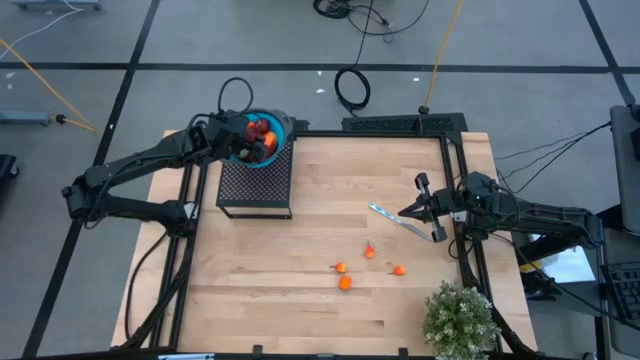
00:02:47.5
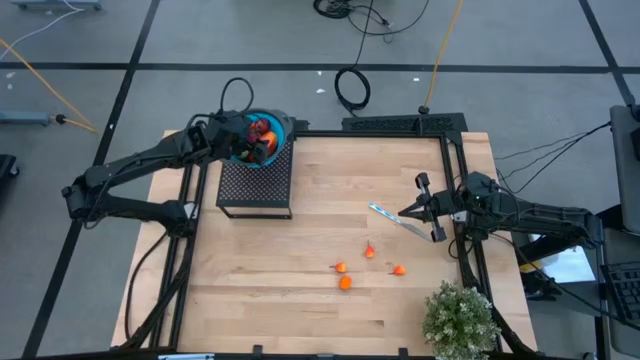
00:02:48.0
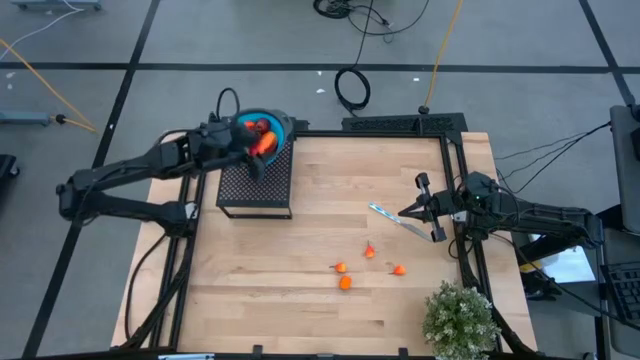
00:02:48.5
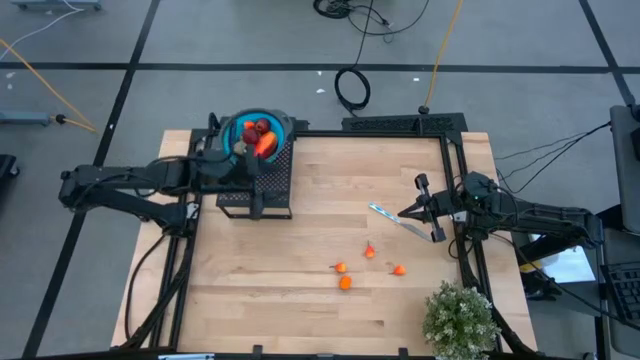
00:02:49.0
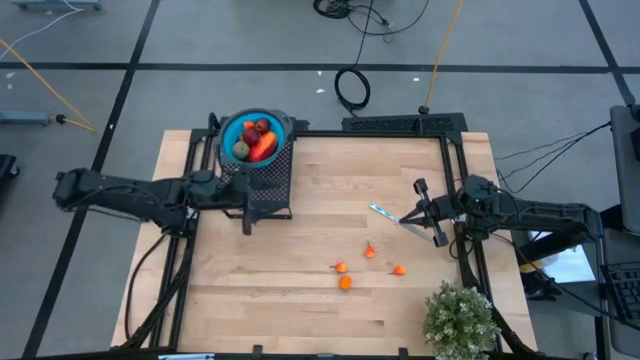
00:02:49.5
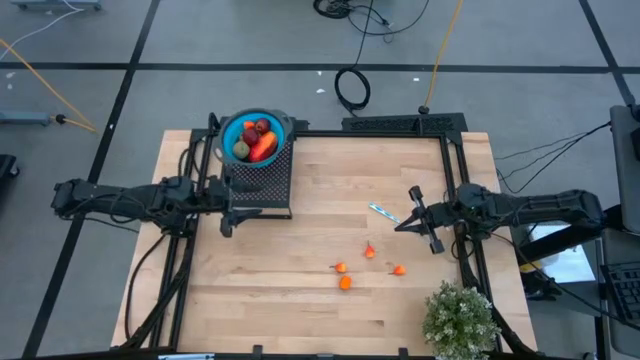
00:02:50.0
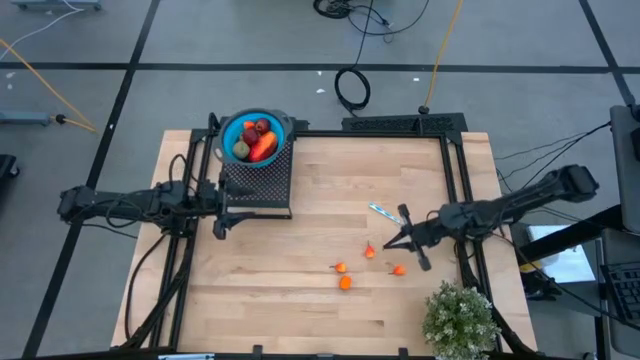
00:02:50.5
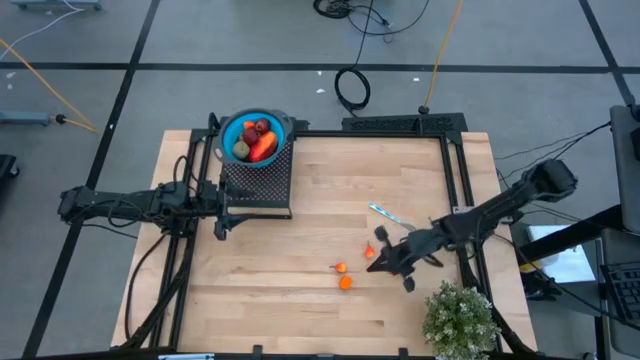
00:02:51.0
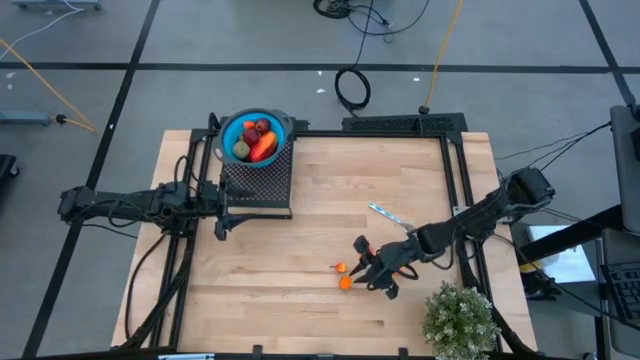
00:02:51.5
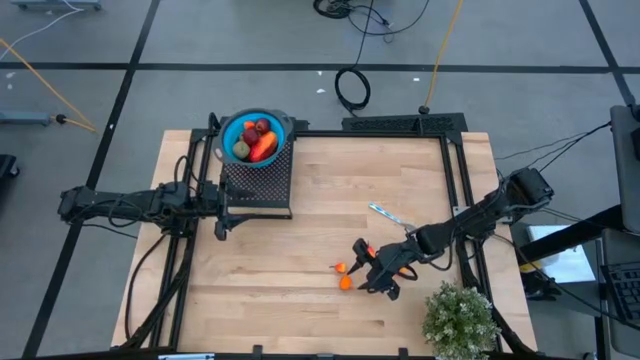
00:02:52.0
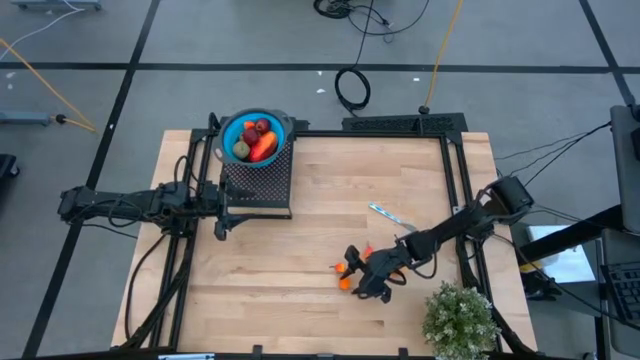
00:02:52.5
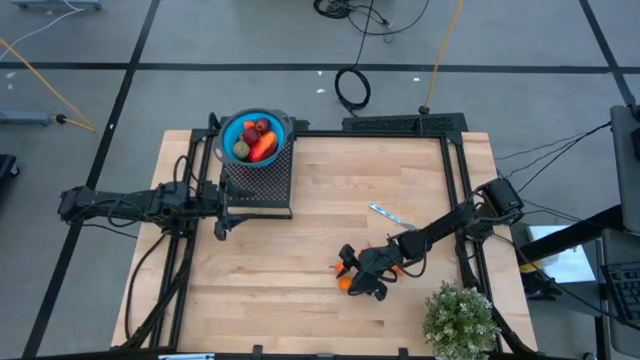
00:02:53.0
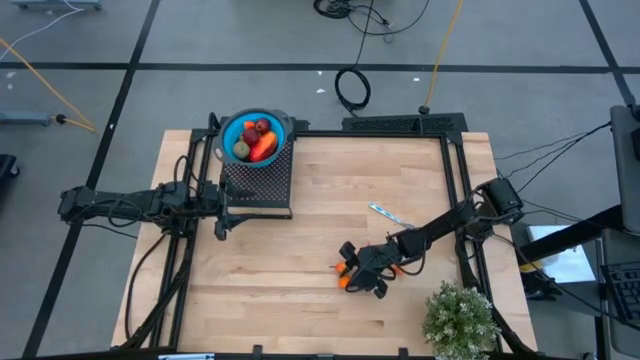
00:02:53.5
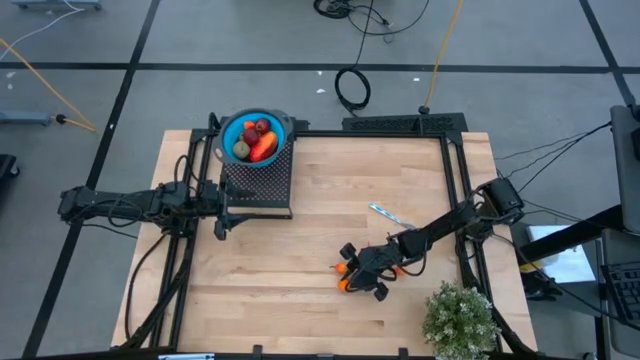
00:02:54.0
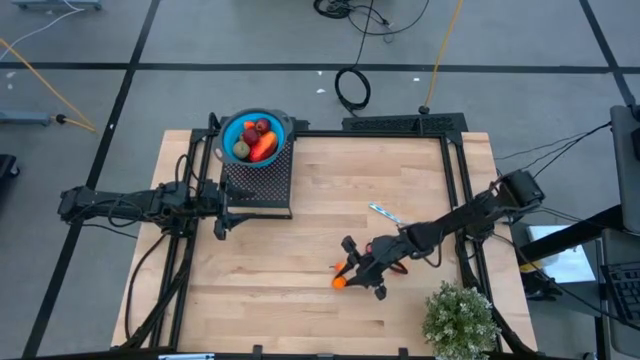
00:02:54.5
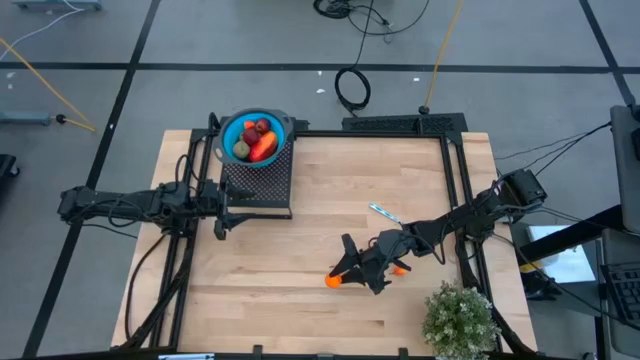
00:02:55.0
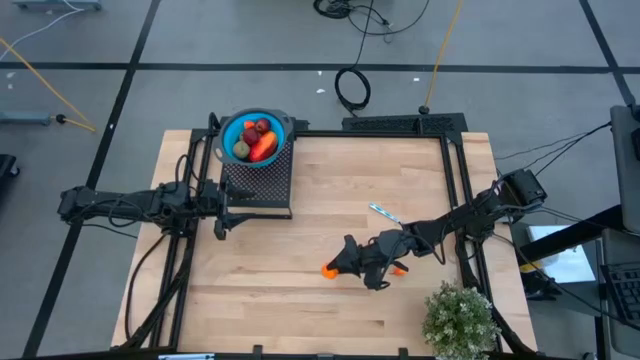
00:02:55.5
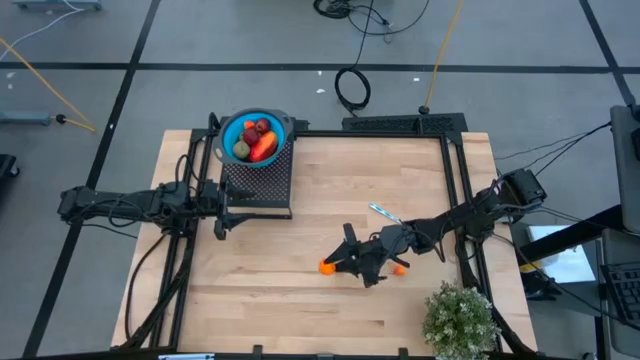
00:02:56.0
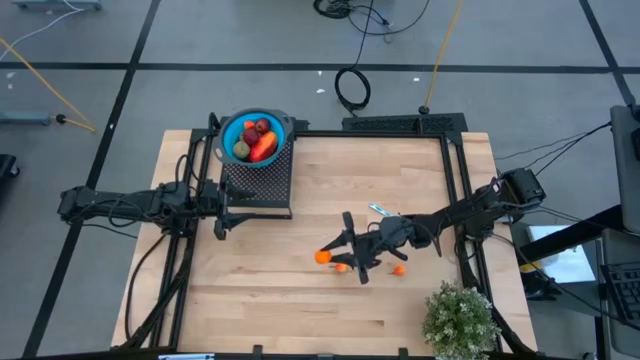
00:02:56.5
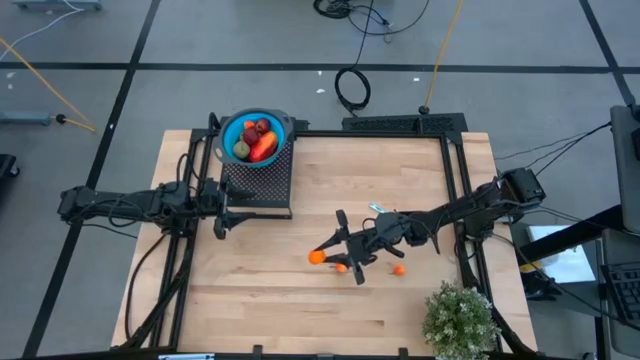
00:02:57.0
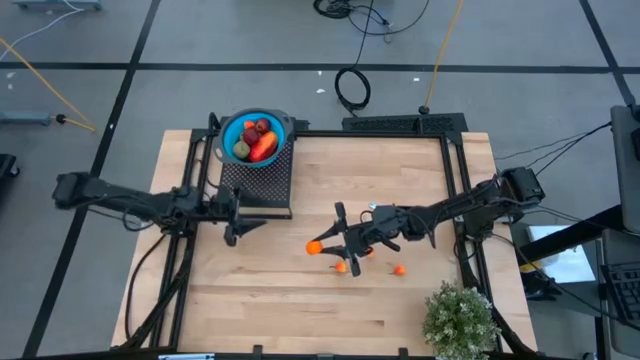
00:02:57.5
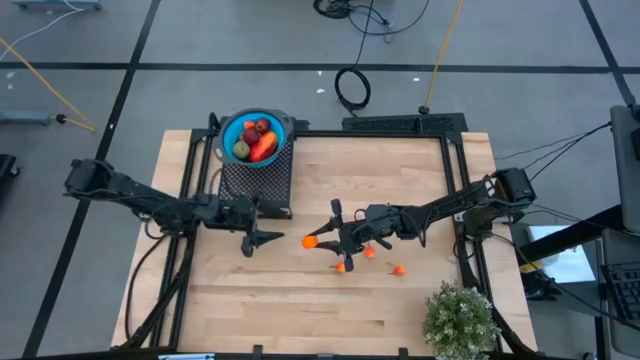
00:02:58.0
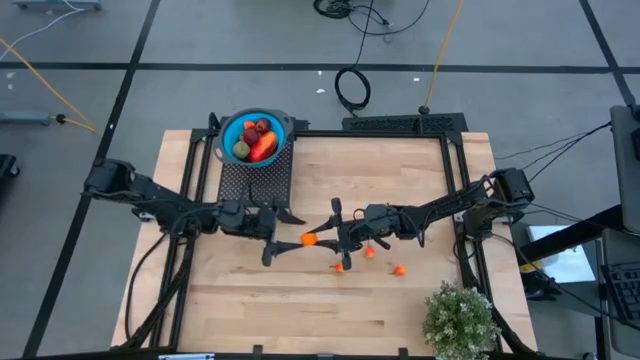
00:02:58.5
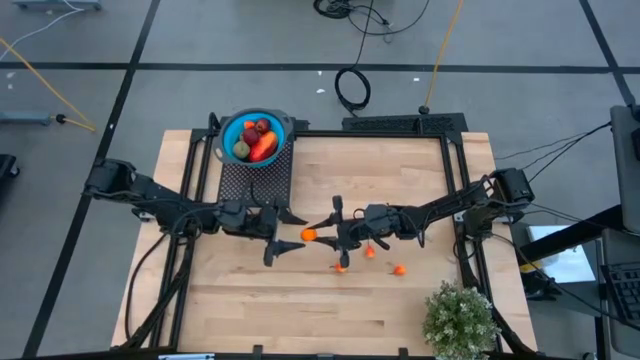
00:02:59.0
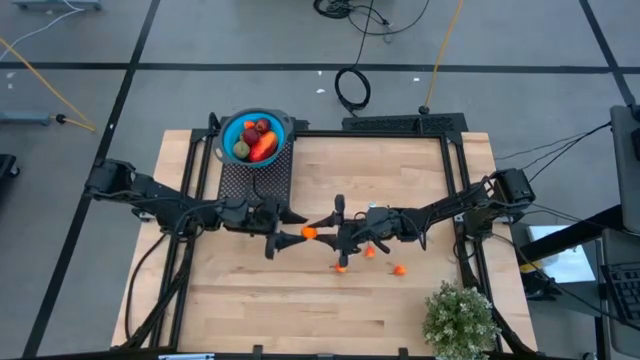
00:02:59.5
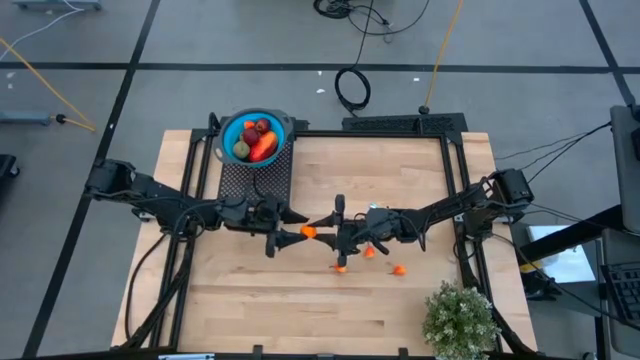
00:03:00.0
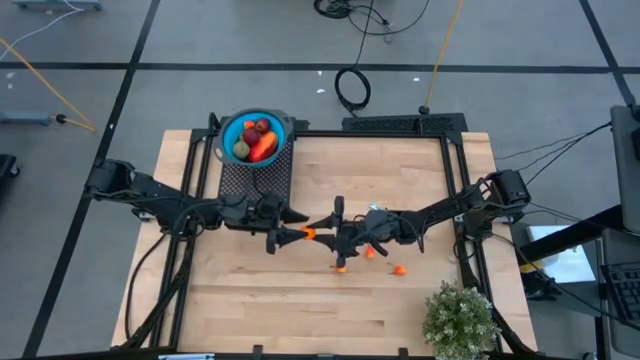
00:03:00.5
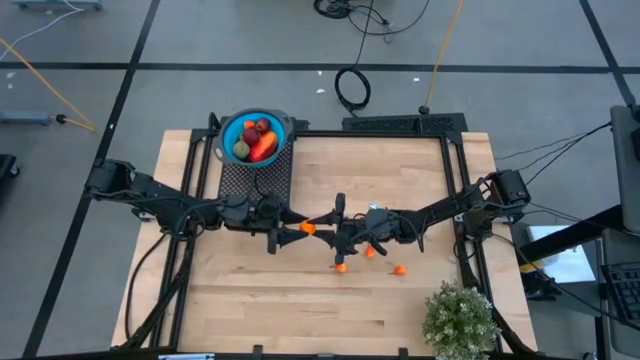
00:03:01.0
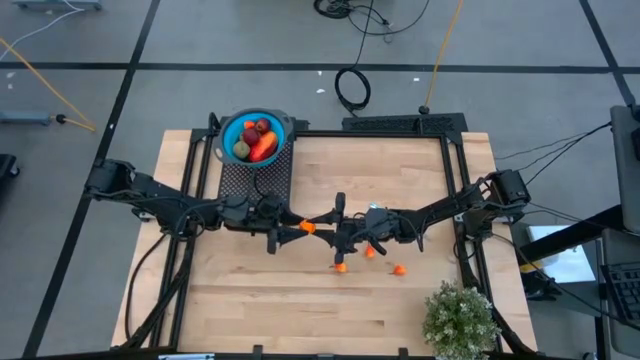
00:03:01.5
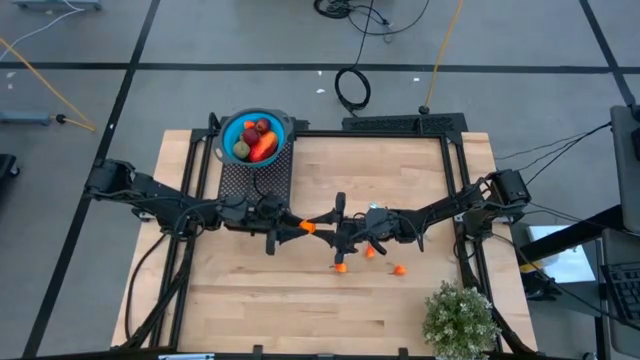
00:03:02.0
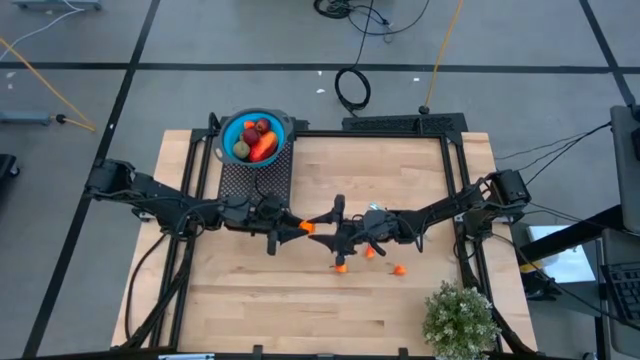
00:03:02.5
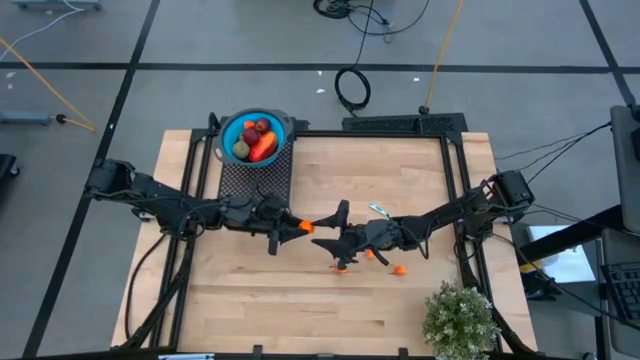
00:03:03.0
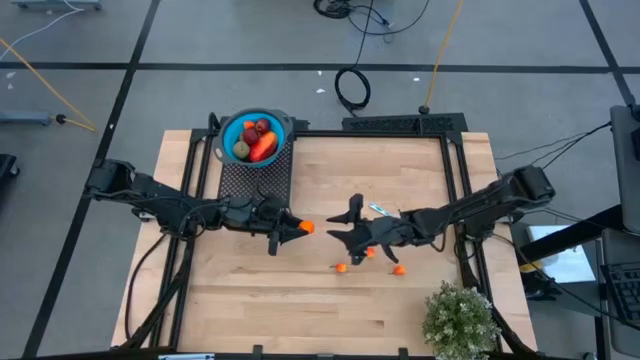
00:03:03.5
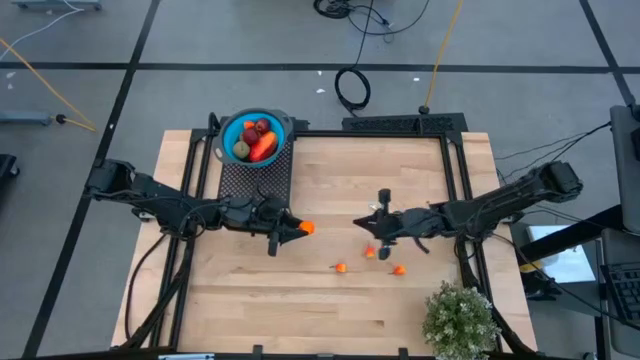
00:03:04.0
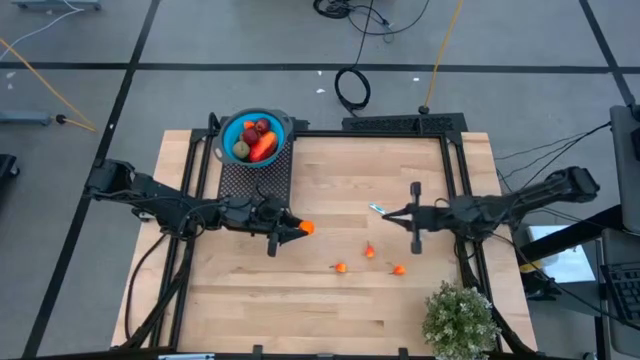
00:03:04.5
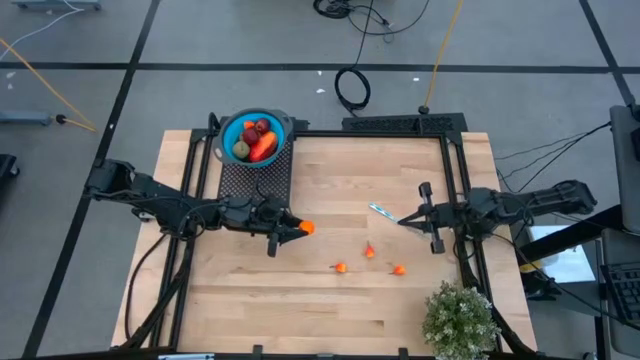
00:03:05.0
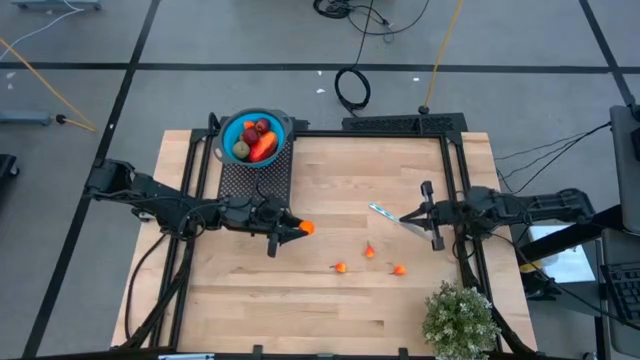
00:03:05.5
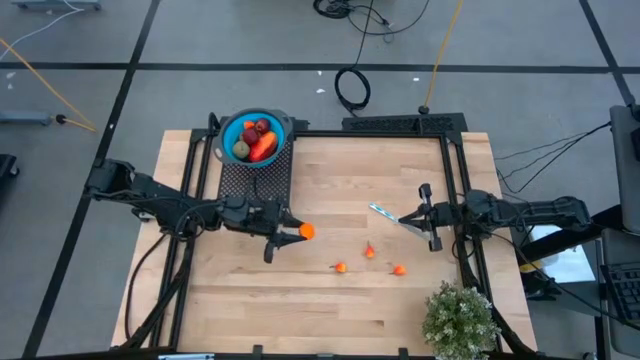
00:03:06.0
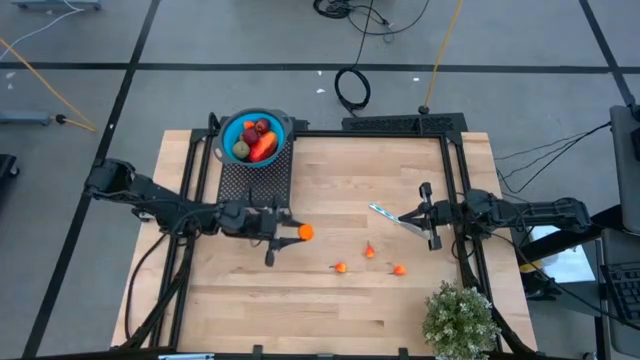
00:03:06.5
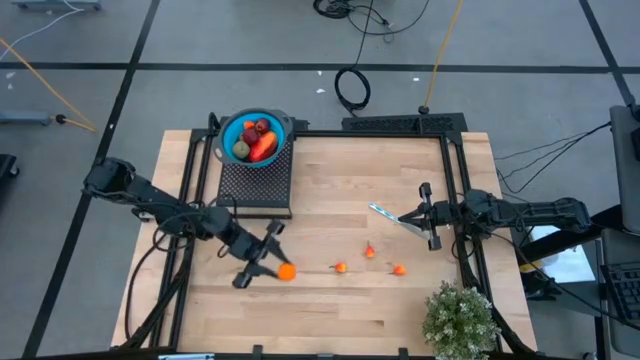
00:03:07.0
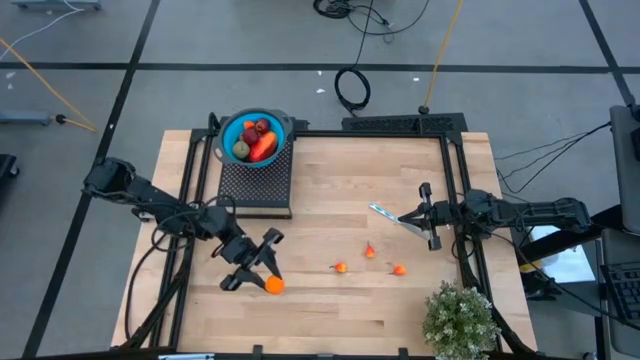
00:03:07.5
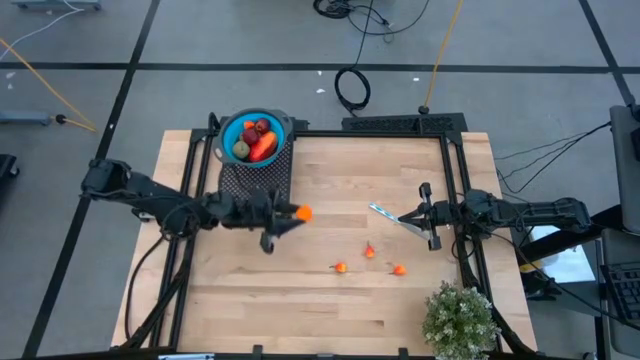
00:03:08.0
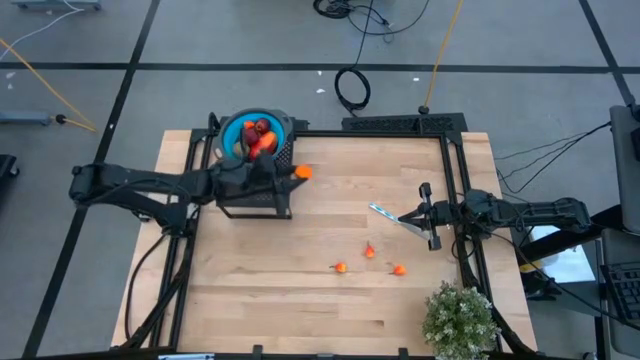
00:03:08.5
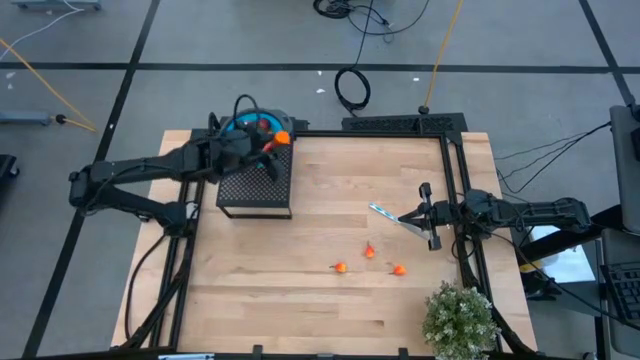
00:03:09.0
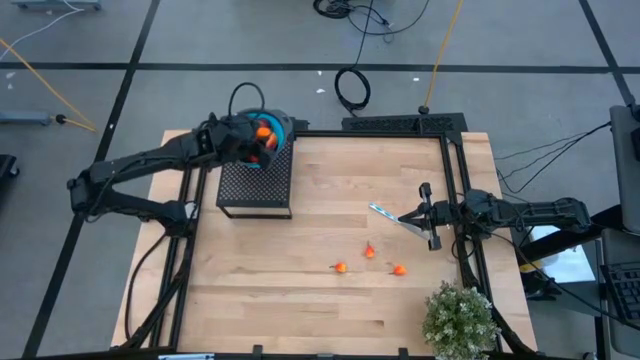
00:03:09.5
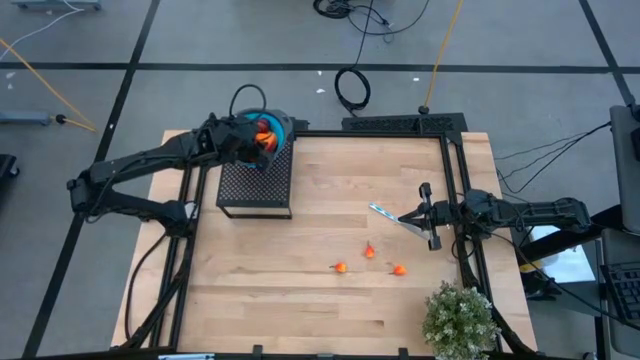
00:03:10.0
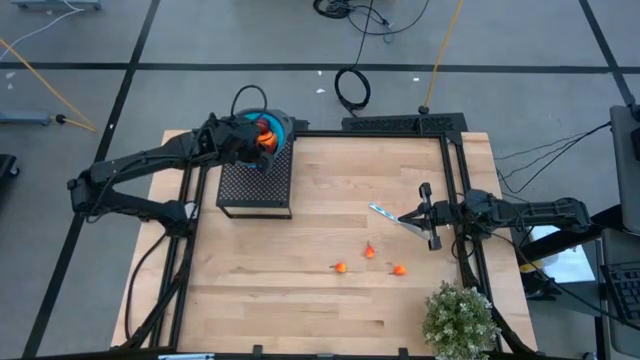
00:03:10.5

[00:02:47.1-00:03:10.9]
Task: Pick & Place Fruit
Put the orange into the blue strainer bowl on the shelf
